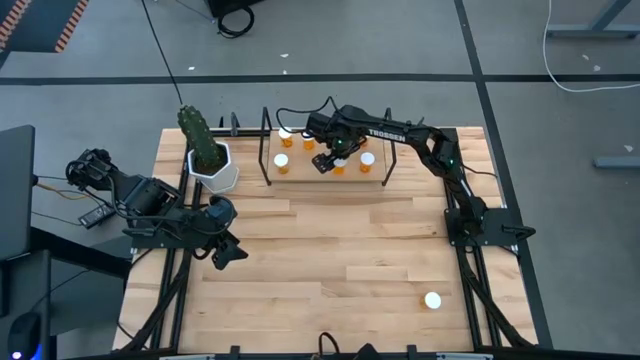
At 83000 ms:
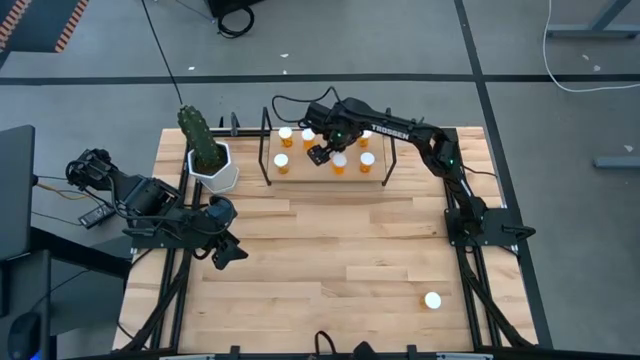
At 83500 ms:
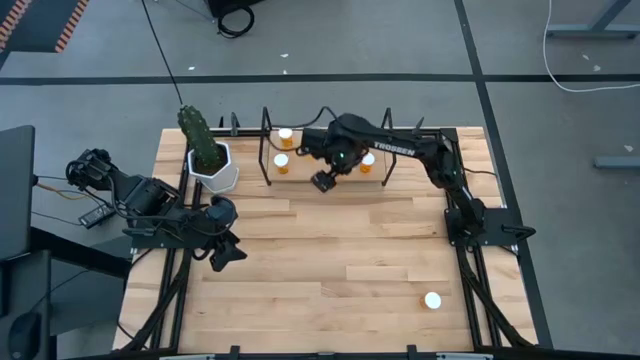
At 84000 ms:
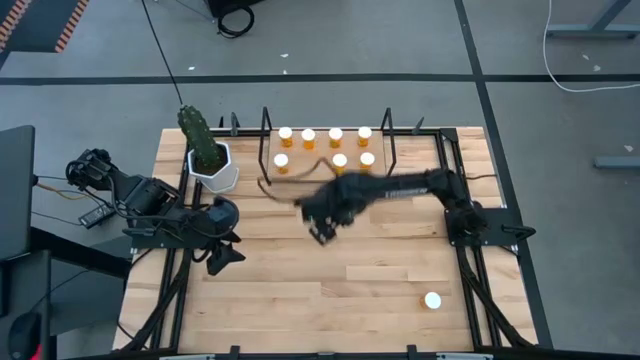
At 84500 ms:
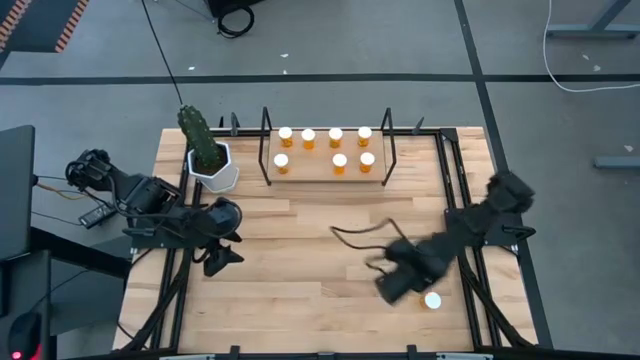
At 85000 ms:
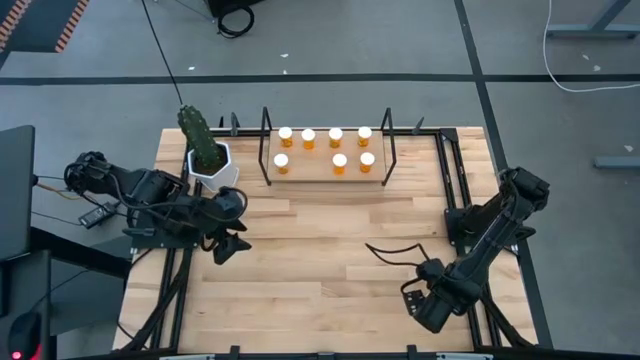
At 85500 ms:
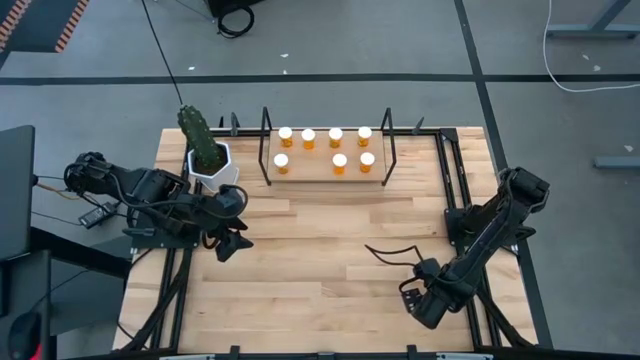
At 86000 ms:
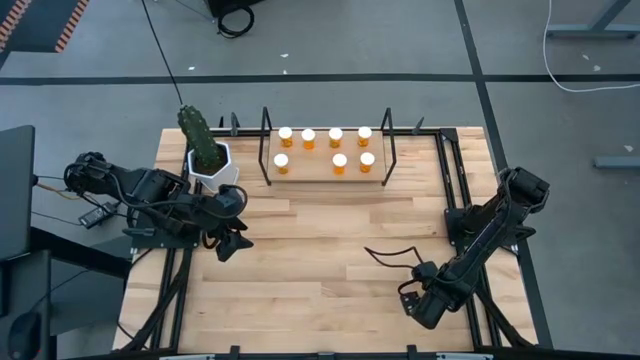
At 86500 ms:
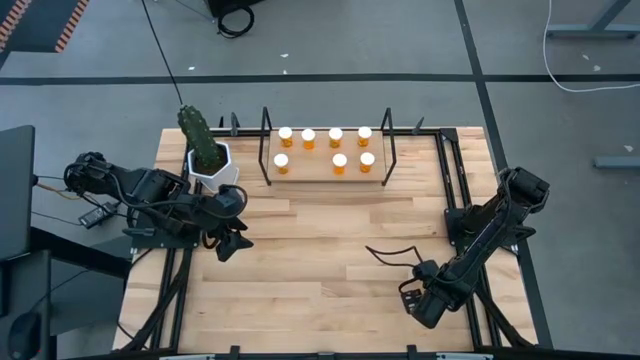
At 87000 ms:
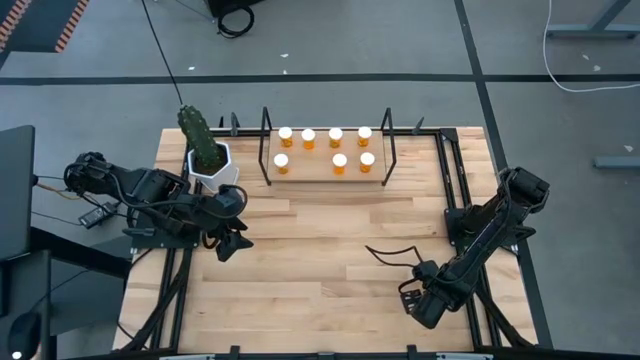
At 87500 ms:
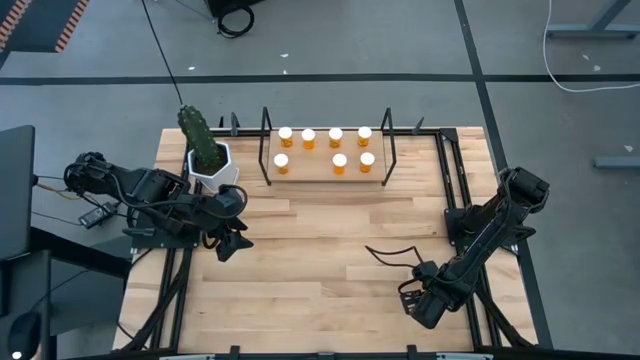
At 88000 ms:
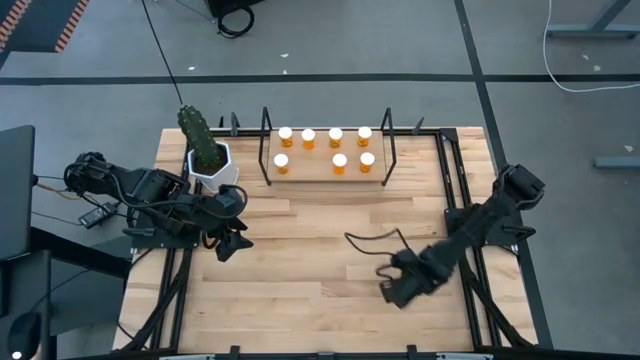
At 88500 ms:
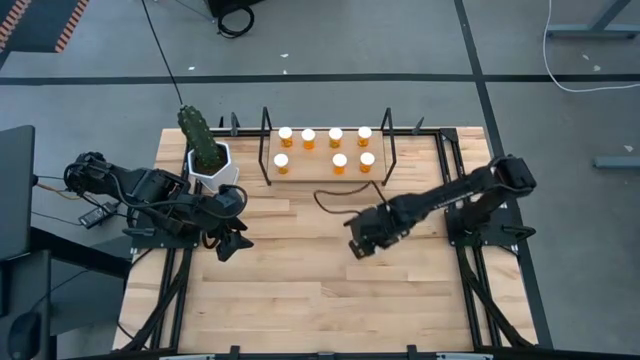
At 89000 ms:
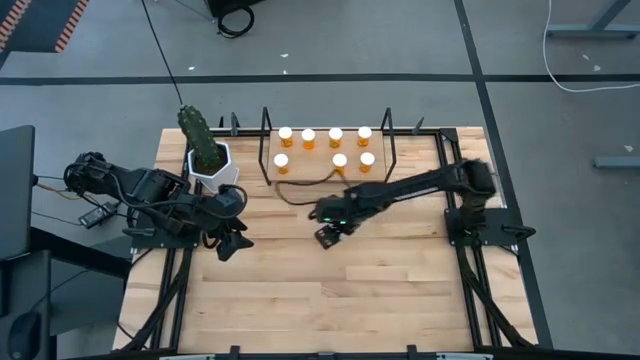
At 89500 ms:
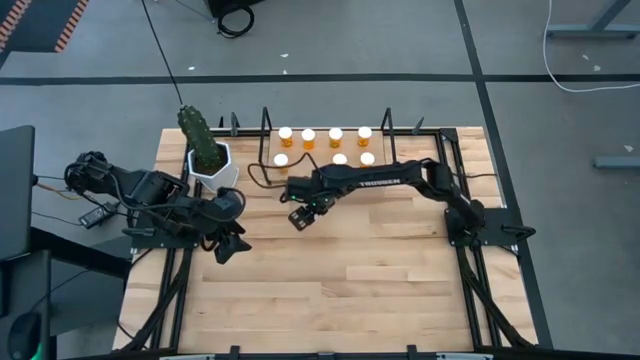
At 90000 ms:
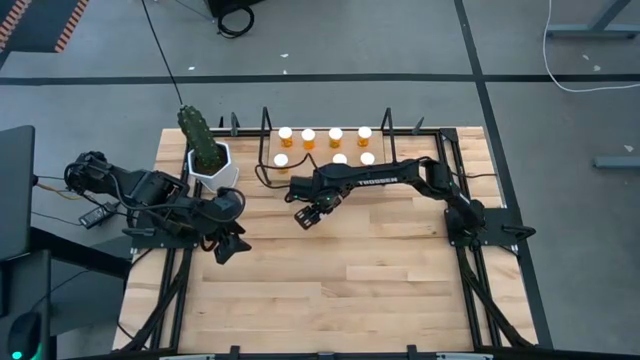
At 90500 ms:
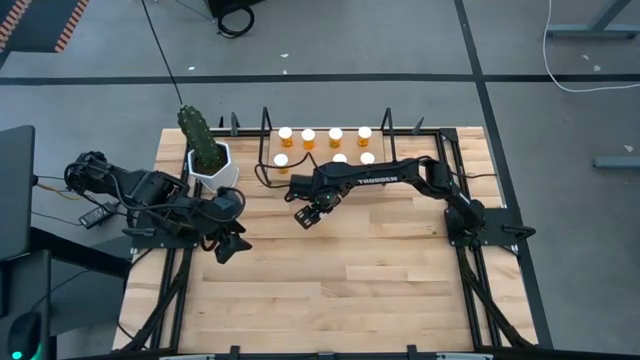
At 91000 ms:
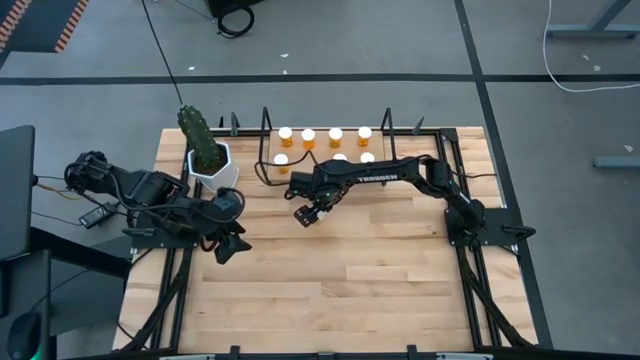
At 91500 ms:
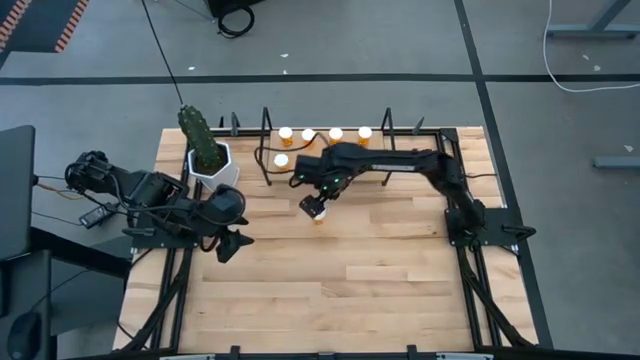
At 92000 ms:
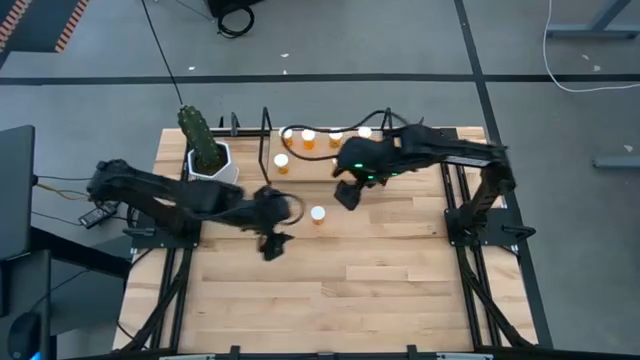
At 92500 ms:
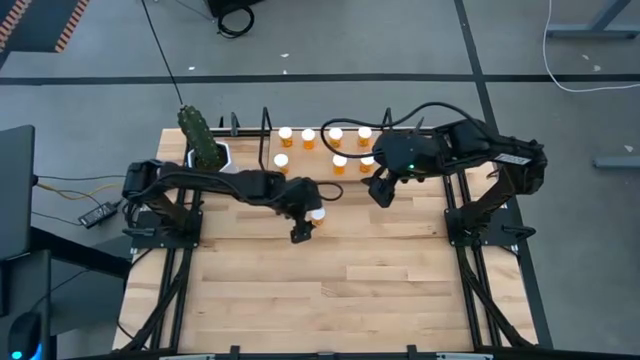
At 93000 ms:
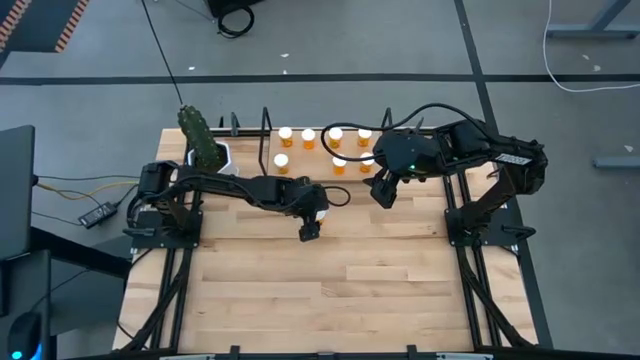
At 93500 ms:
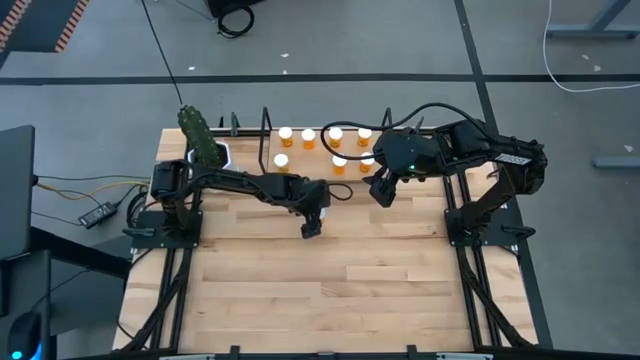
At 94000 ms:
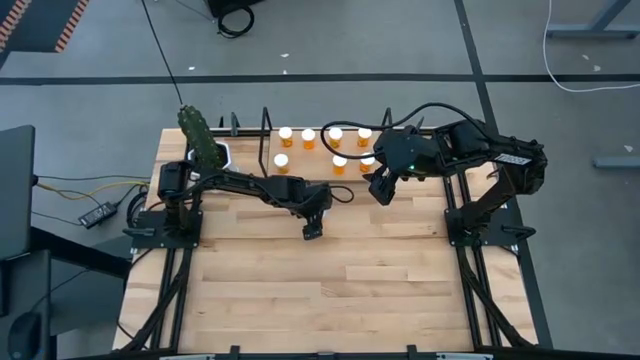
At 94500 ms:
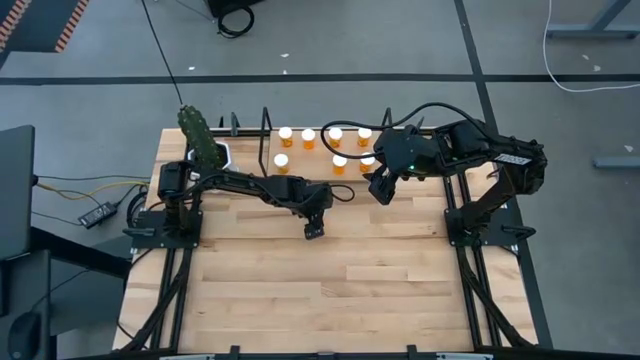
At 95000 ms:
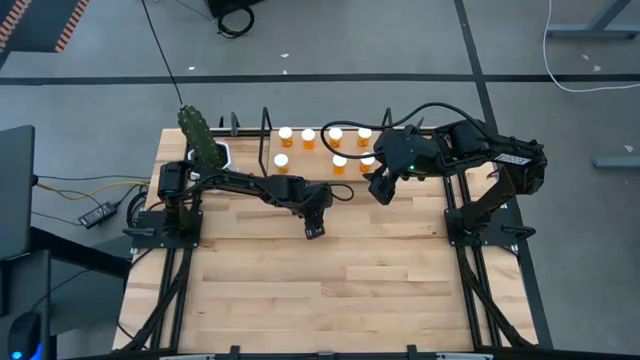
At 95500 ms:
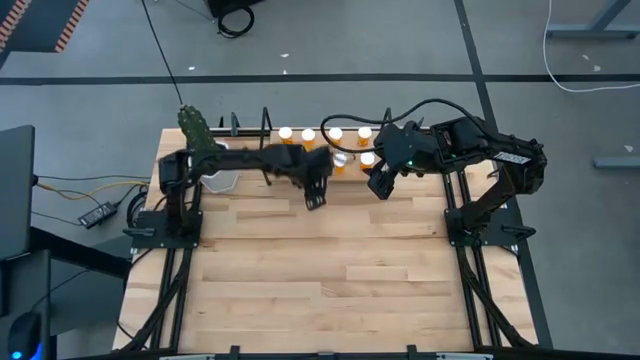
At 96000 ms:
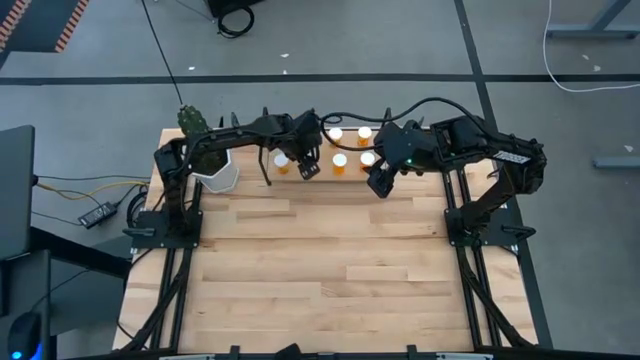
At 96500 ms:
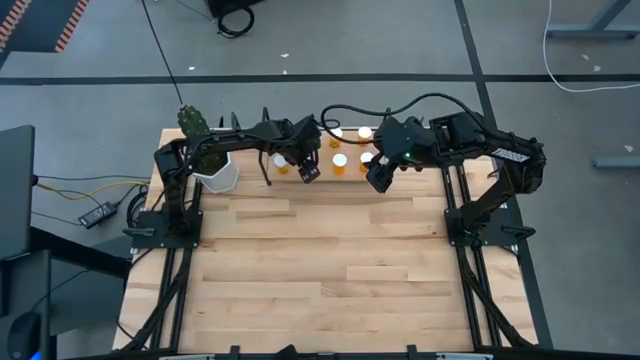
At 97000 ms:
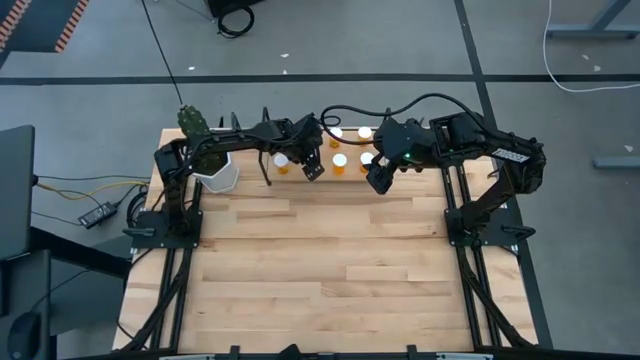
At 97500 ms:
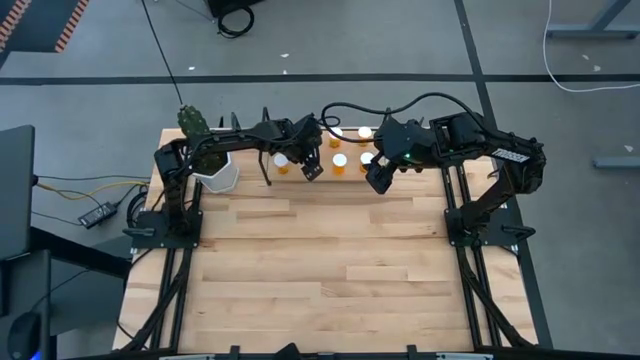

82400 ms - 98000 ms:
Task: Pick and place medicine bottles onto shelf by color
Put the orange pill bottle on the shelf

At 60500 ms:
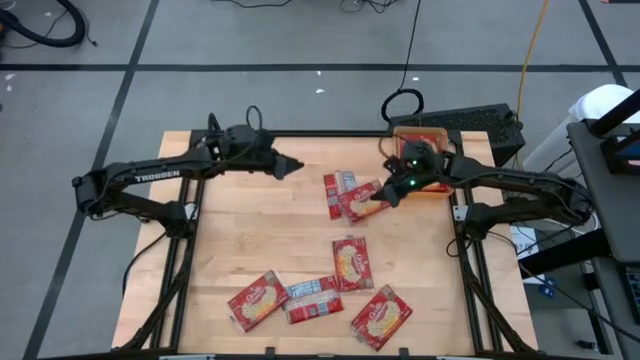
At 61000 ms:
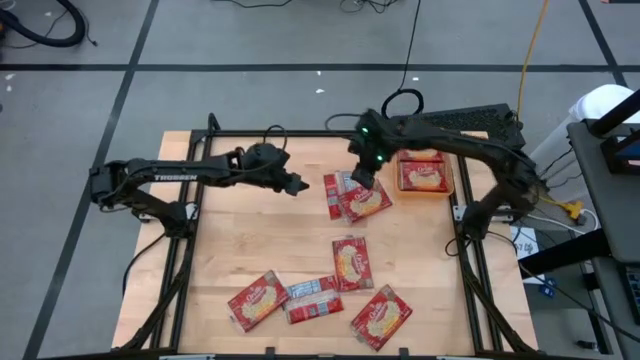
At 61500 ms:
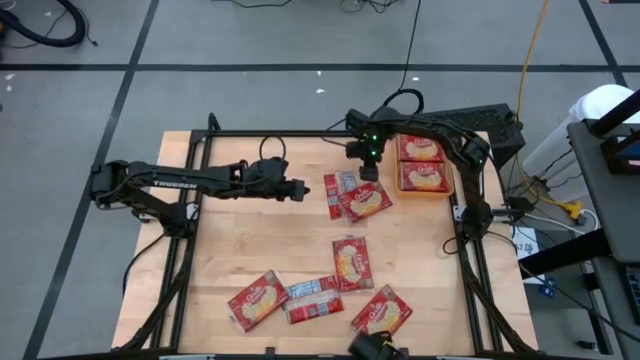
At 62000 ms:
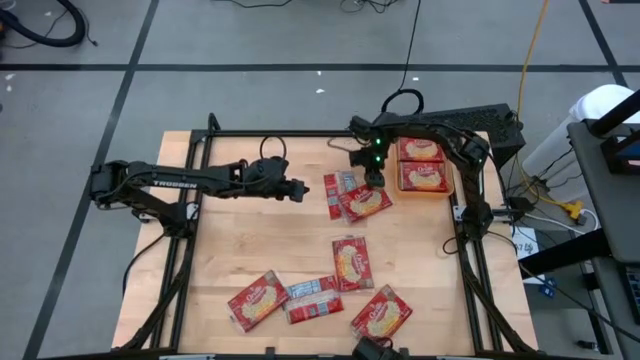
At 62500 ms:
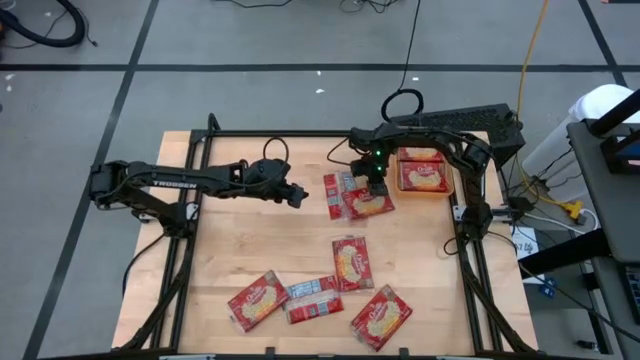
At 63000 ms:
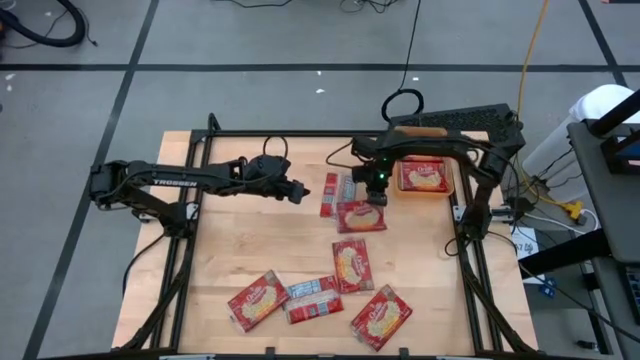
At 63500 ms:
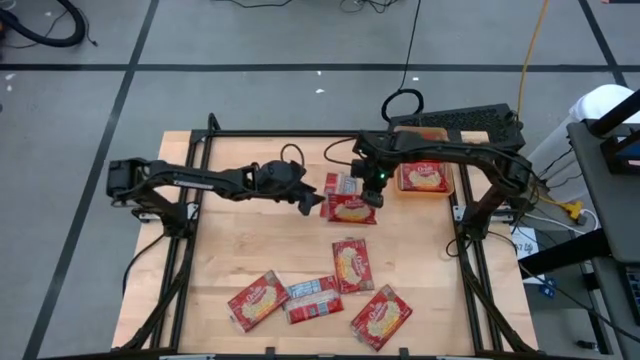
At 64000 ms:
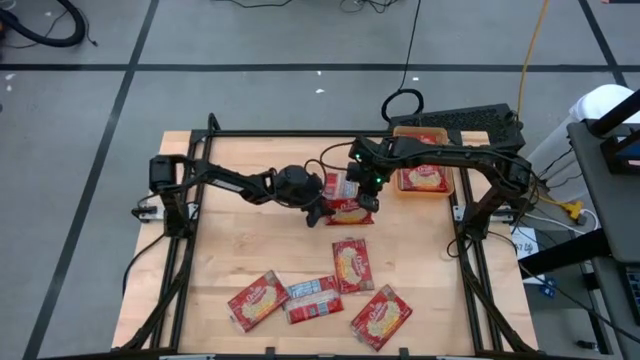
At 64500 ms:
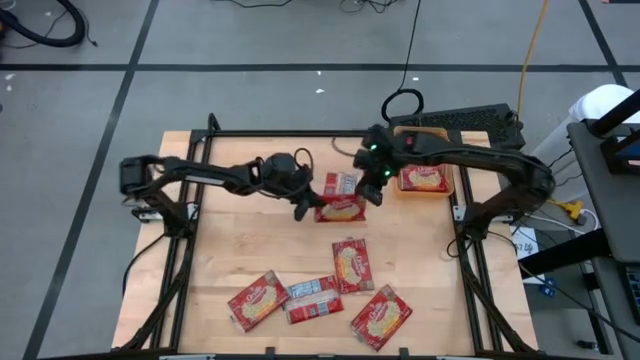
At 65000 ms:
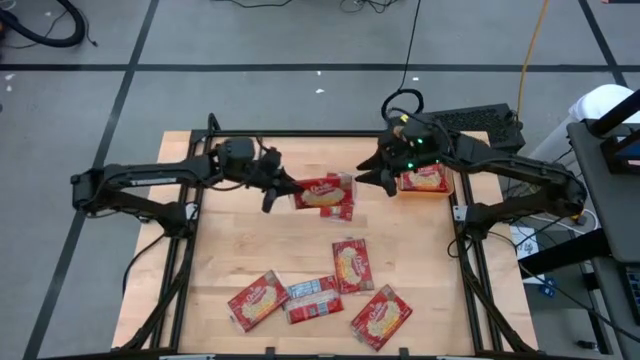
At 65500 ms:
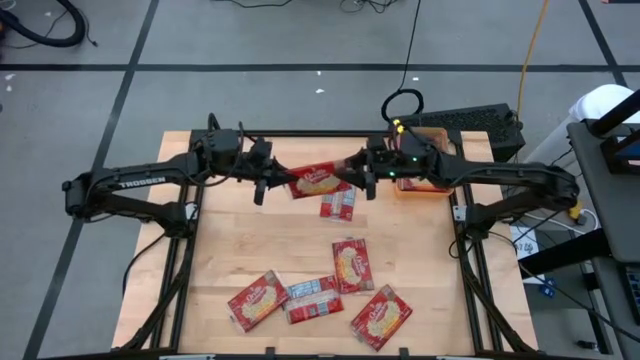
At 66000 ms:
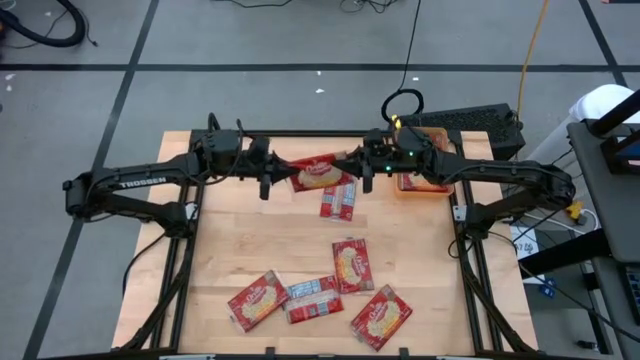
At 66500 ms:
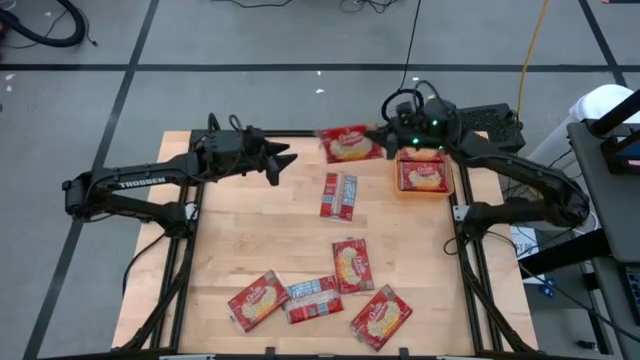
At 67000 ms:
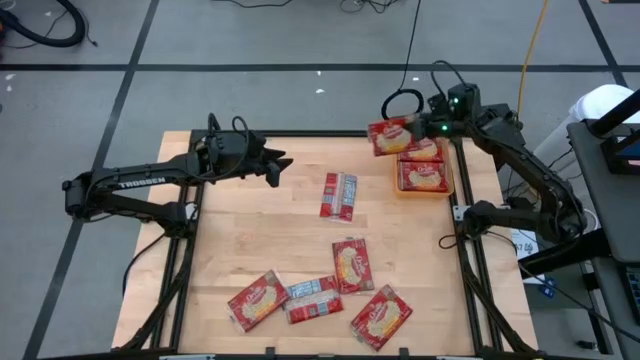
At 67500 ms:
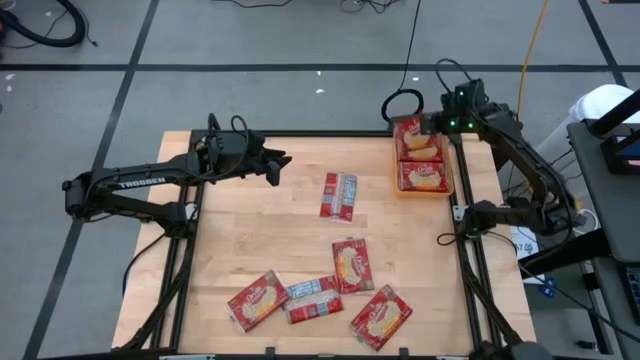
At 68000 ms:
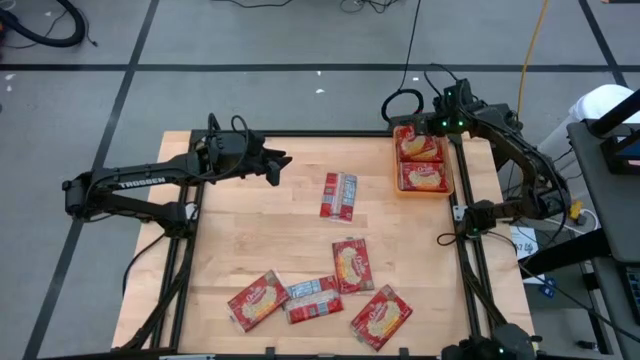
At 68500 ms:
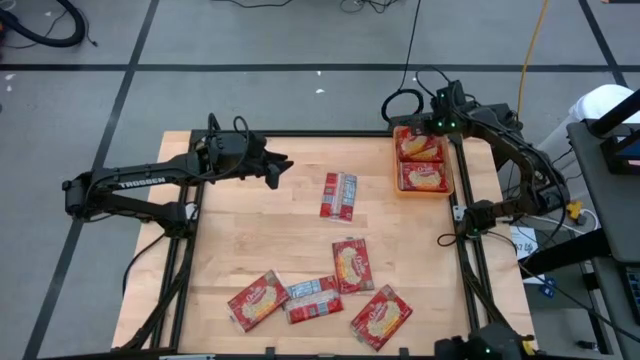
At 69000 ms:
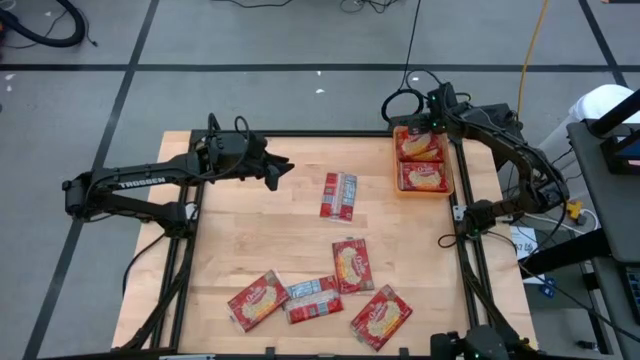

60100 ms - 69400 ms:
Task: Sort popcorn bags into baskets
Put the red popcorn bag into the orange bin
